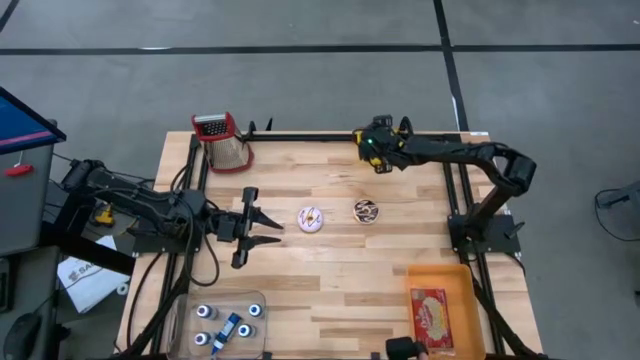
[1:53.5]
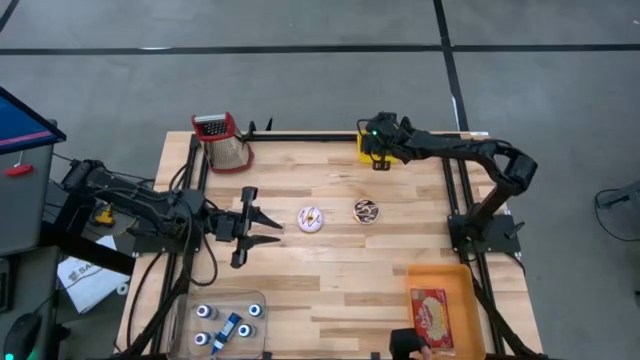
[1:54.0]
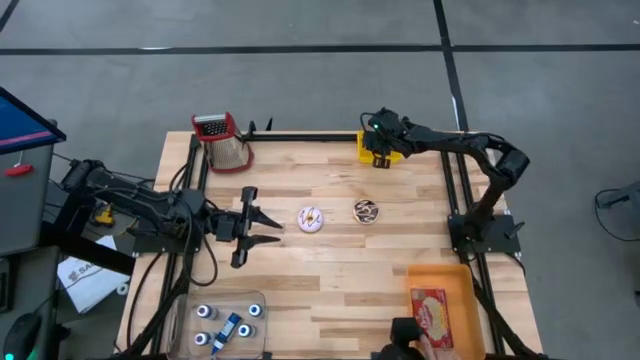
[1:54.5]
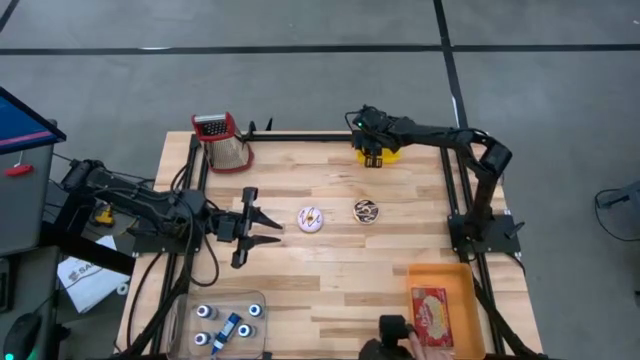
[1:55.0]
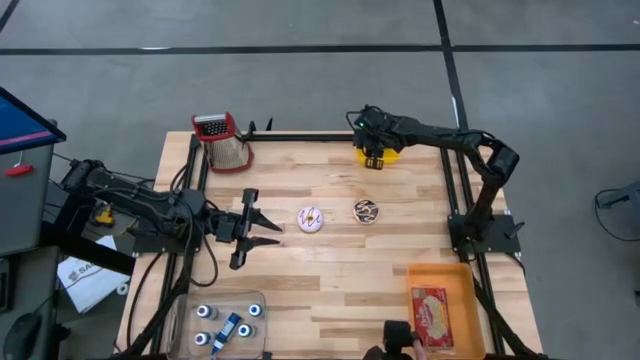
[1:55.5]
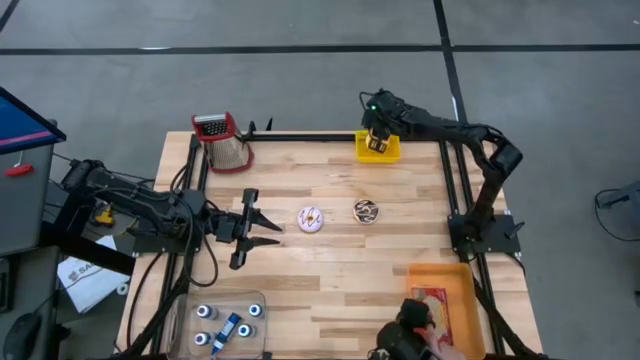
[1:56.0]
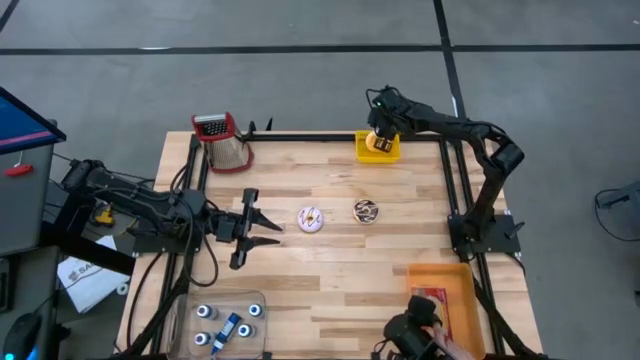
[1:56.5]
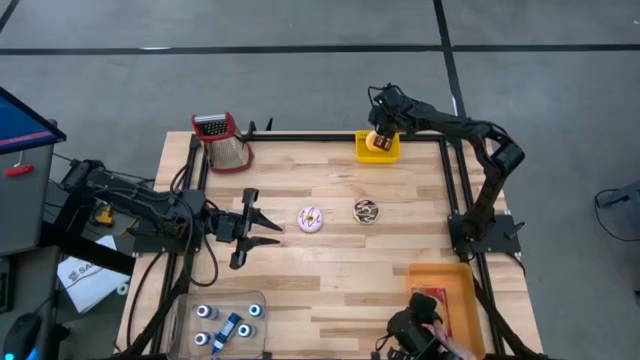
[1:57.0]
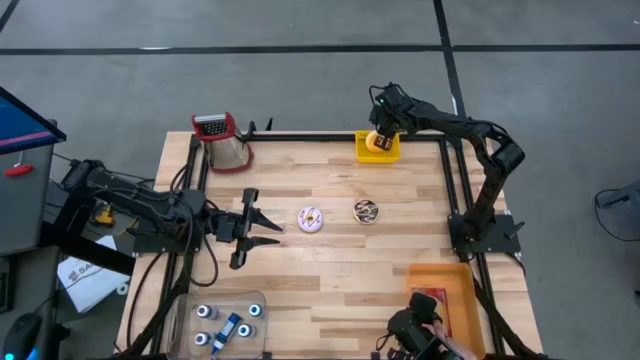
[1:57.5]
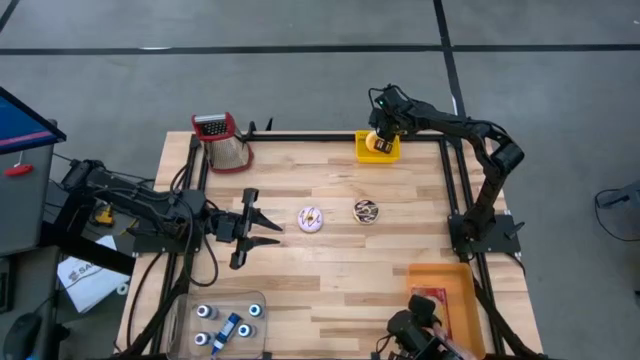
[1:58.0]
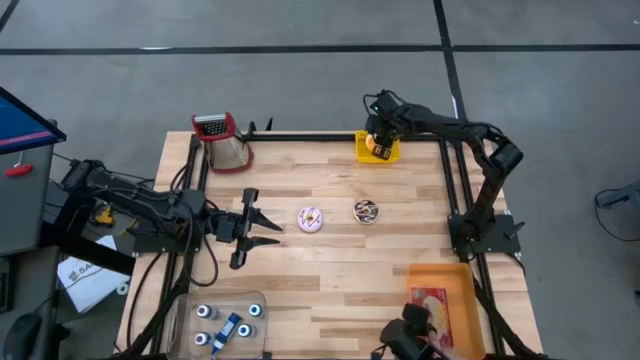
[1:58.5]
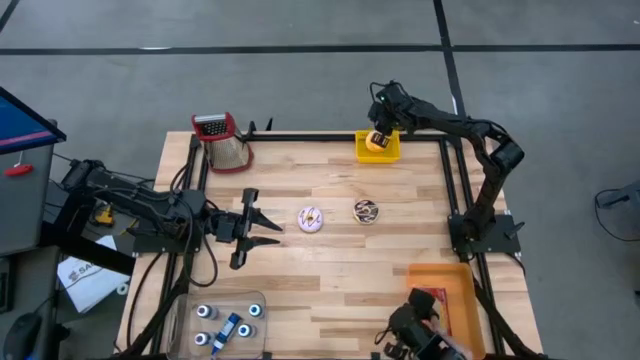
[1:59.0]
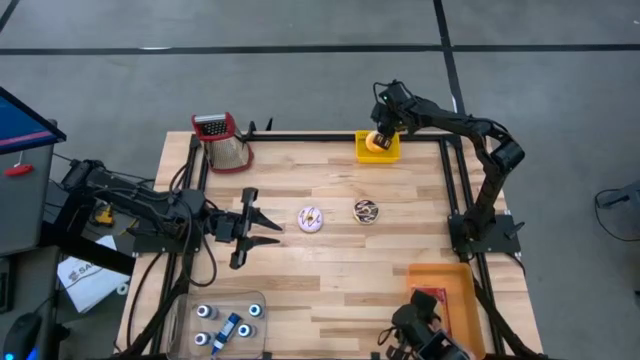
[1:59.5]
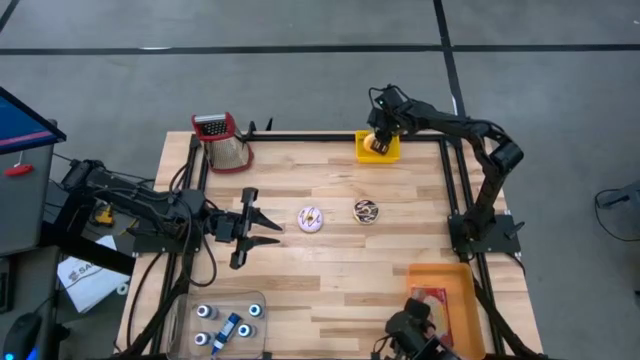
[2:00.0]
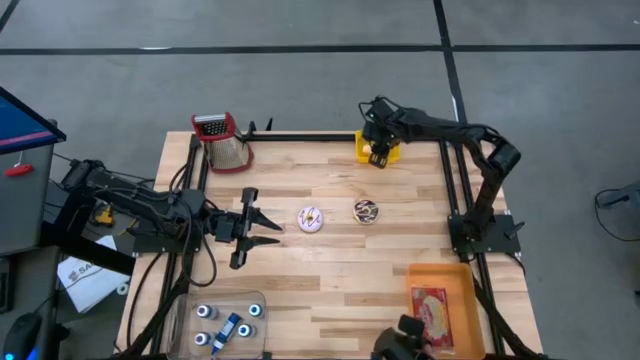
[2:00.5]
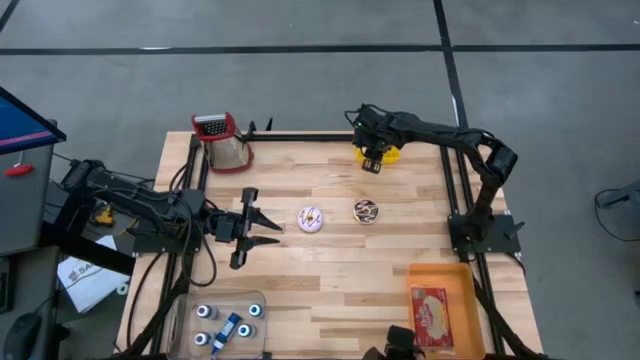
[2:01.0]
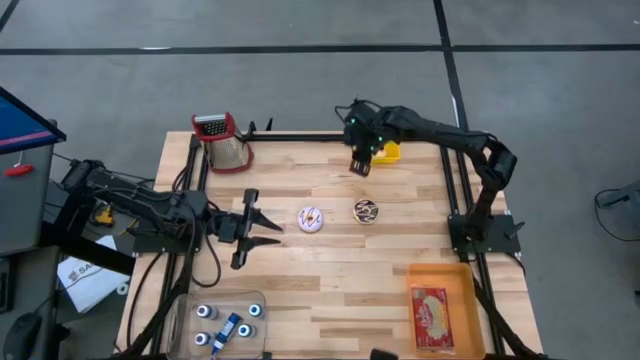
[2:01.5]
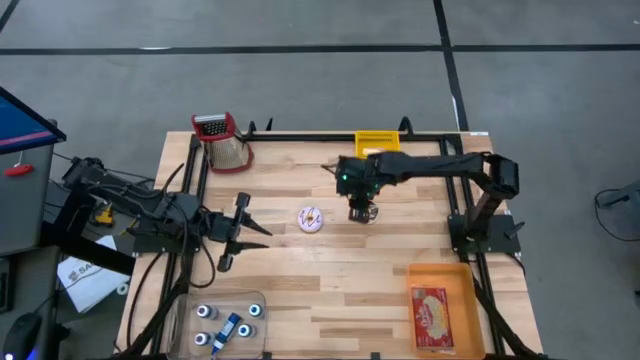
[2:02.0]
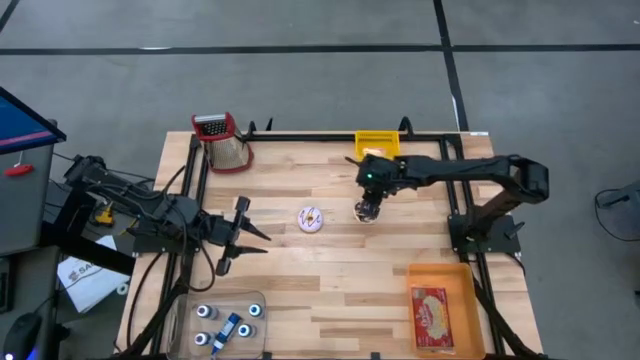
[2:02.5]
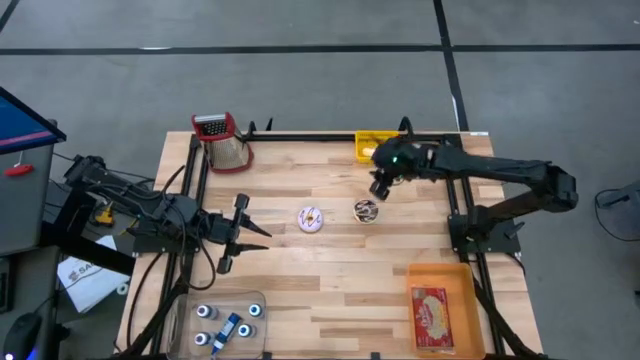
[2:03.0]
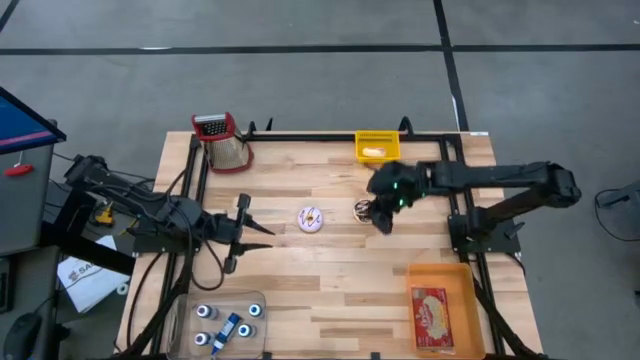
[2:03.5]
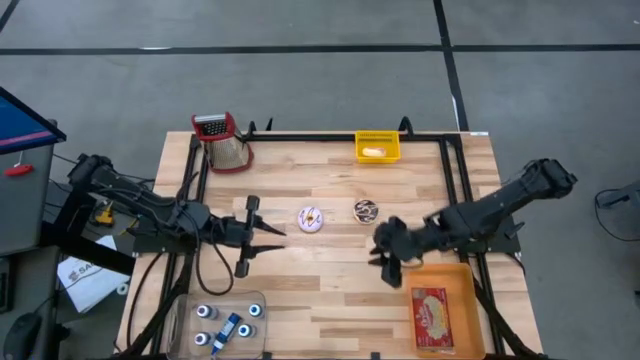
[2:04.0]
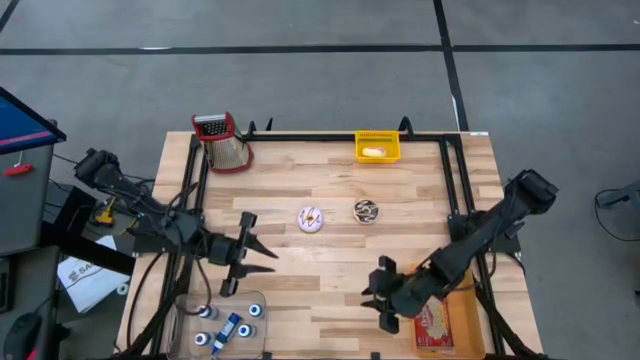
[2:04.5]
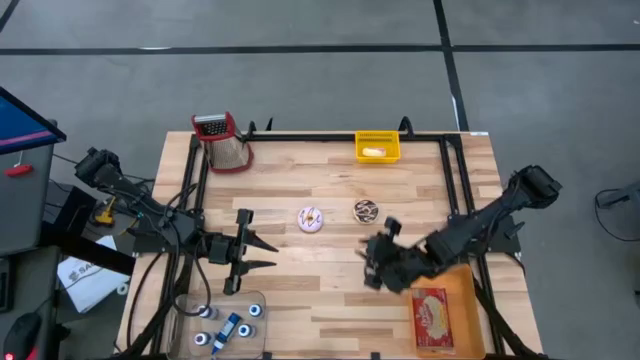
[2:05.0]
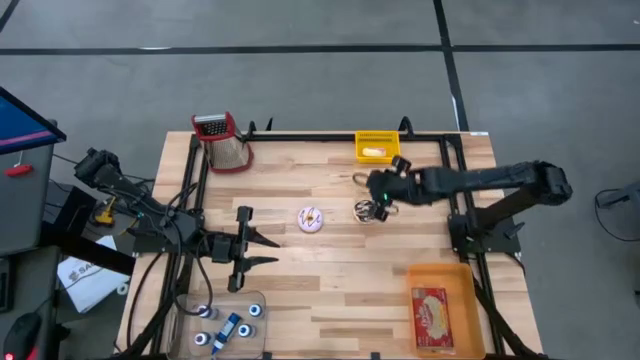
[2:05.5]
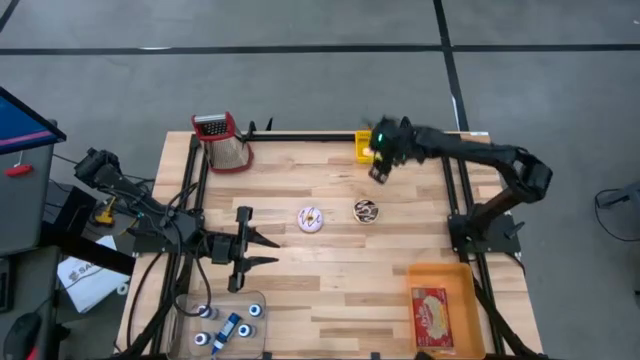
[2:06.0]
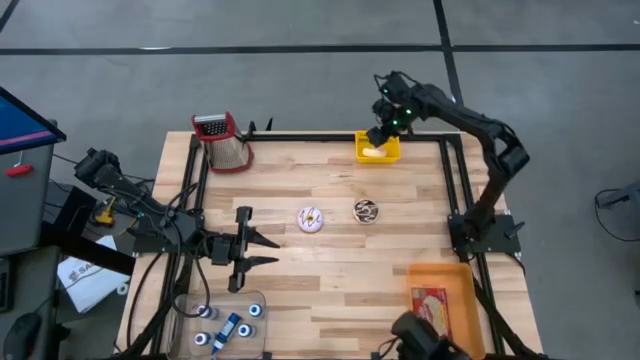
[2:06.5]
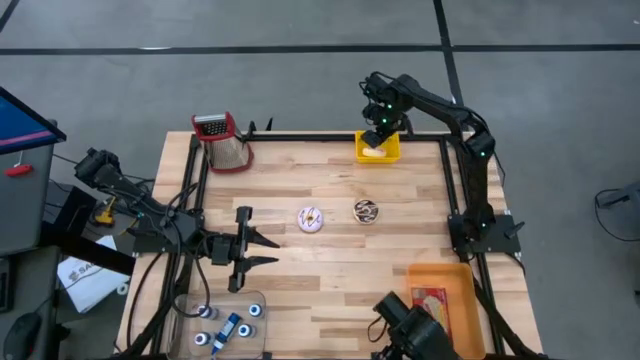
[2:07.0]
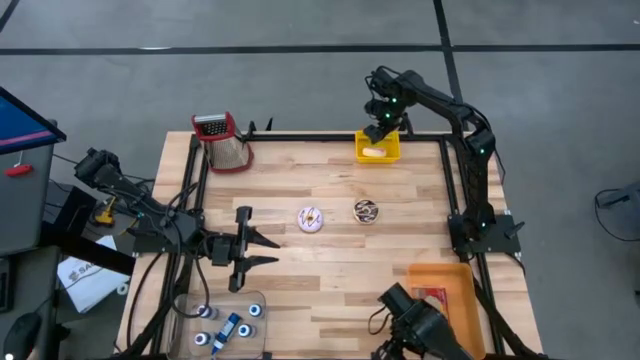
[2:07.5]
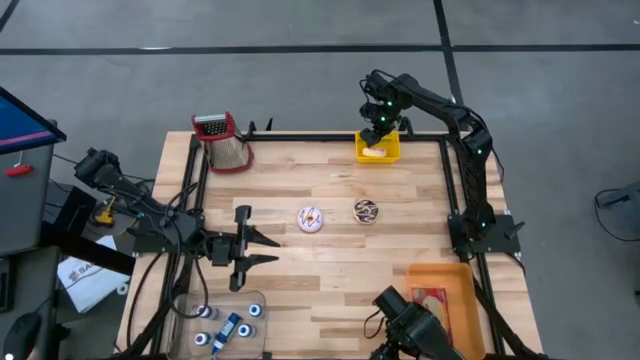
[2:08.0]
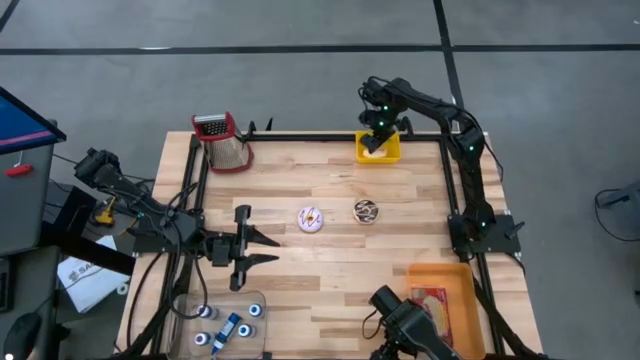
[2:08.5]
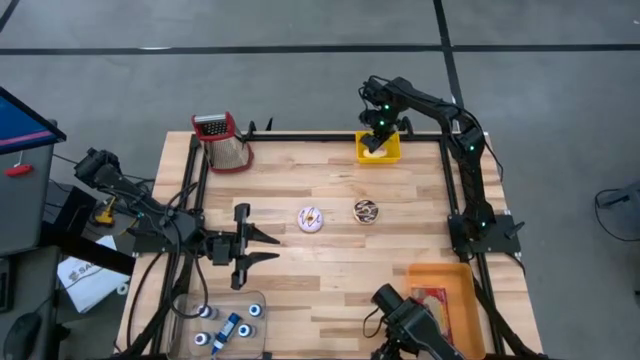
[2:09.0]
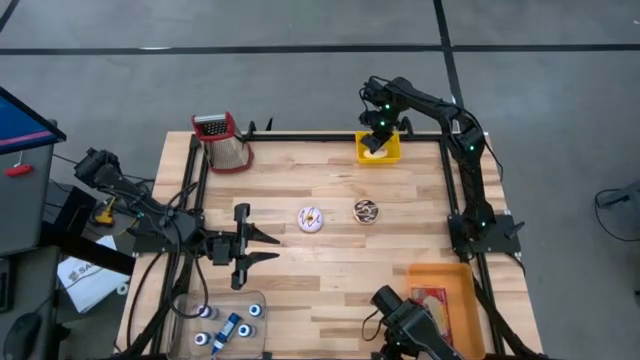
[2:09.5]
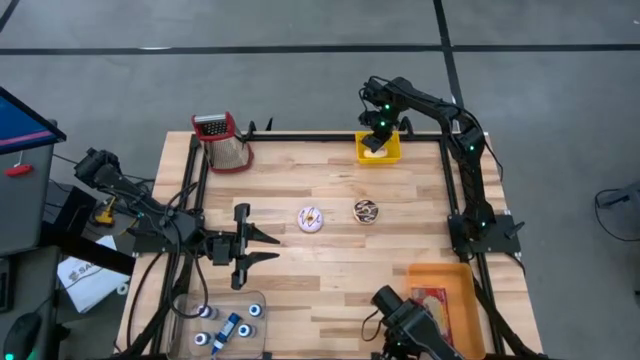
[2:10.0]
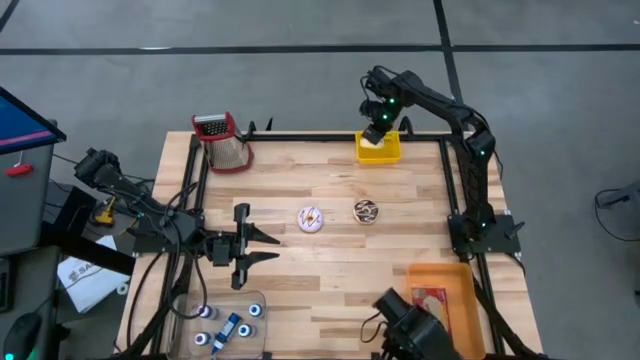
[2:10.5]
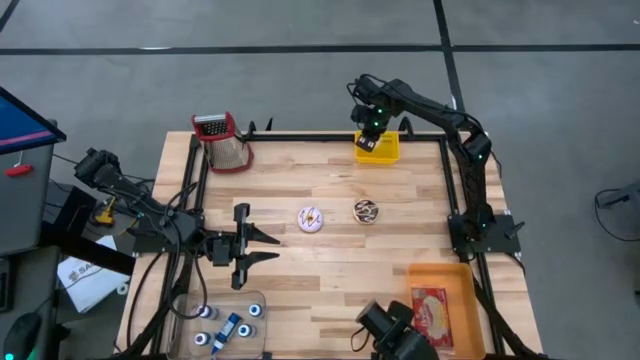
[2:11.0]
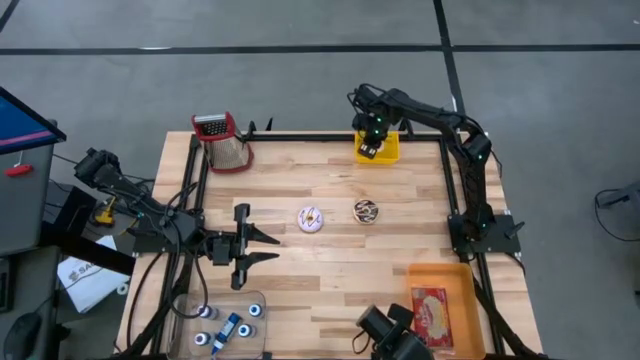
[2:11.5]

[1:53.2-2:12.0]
Put the pink donut into the yellow bin
